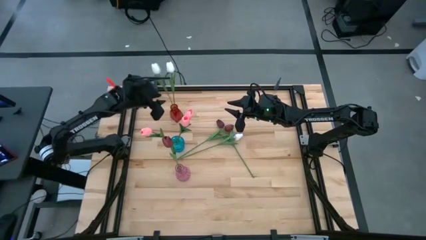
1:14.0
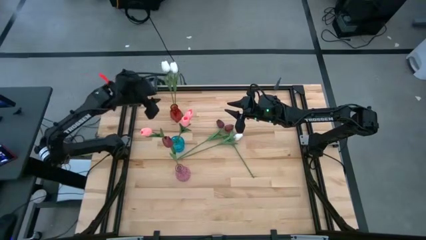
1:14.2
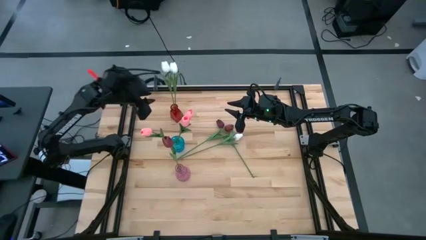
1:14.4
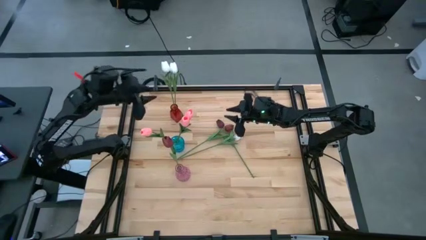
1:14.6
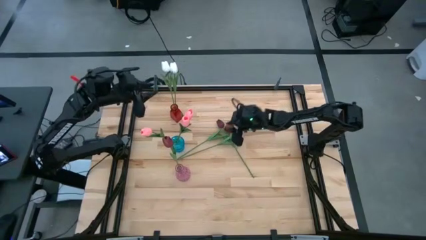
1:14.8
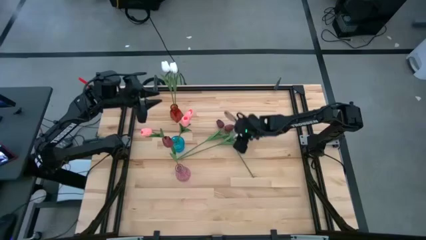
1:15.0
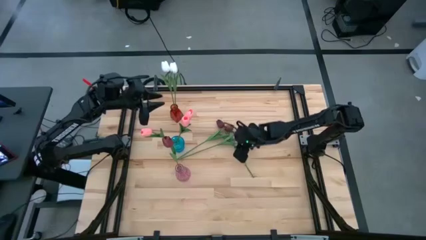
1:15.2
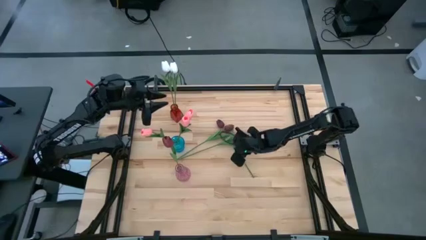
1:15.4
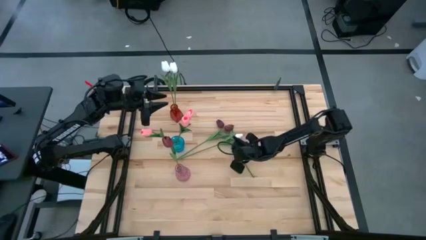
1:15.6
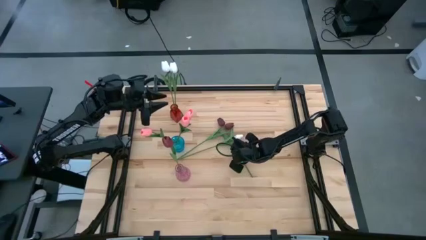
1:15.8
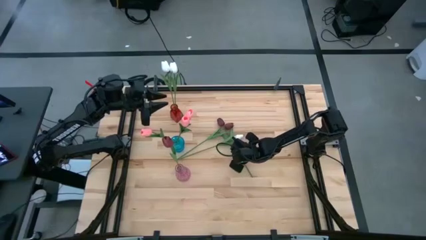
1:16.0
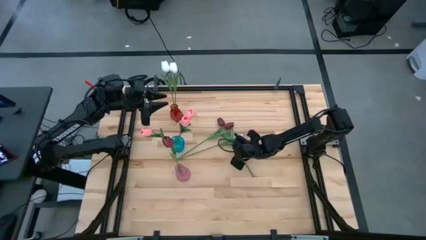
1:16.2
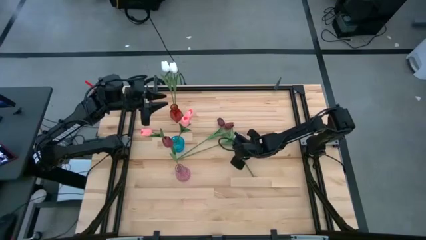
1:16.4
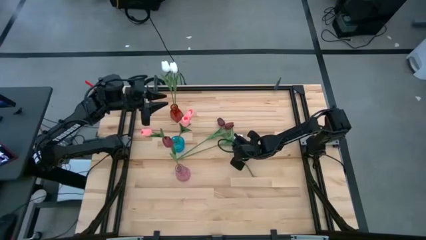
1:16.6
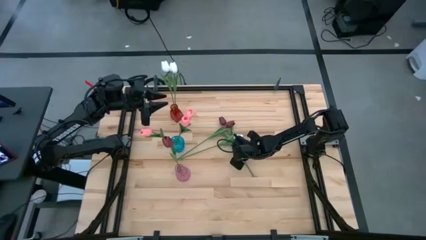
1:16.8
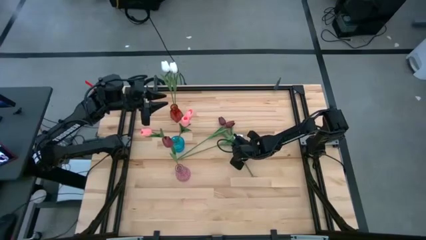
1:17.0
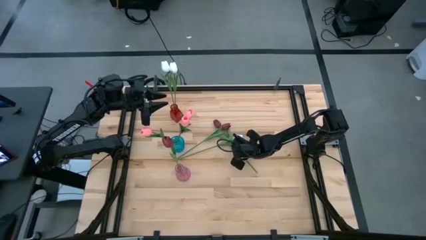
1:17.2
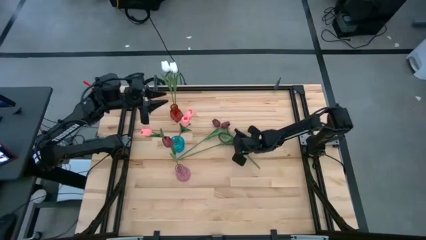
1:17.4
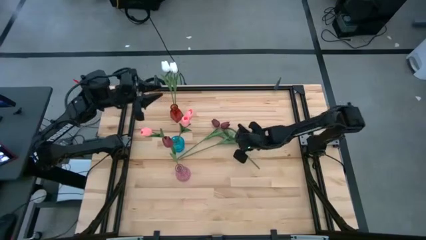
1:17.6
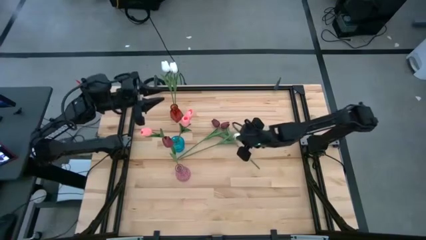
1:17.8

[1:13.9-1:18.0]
Task: Sort flowers into vase by color
Put the right red flower into the pink vase

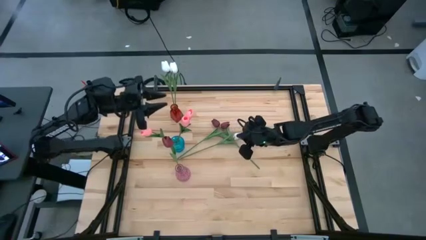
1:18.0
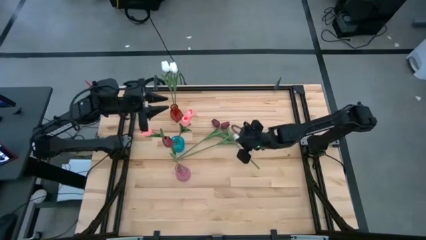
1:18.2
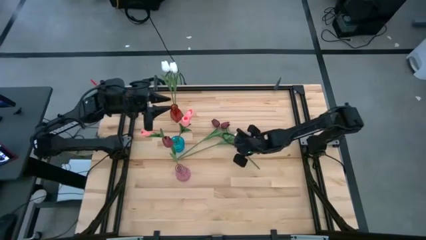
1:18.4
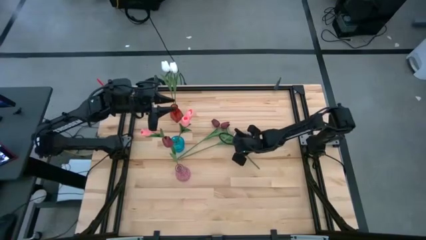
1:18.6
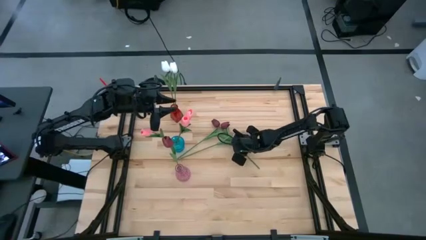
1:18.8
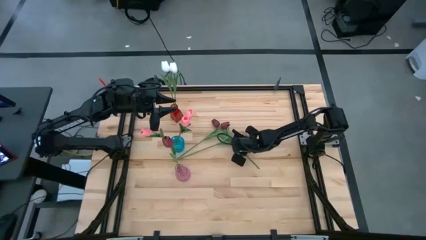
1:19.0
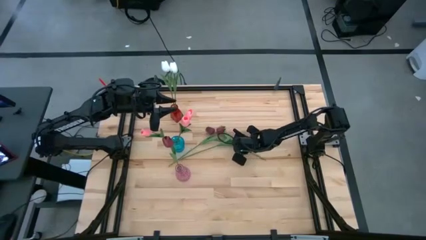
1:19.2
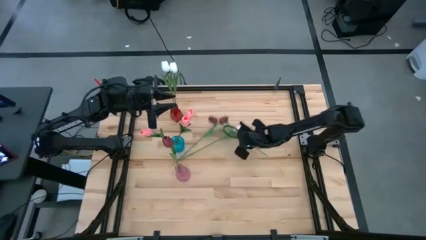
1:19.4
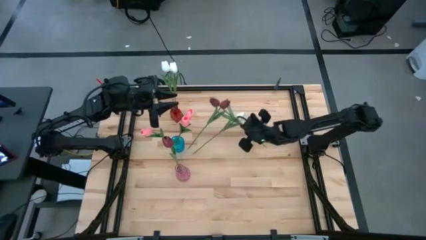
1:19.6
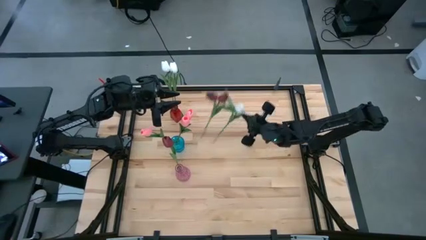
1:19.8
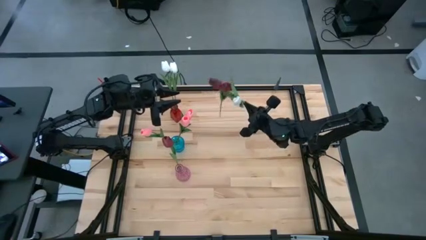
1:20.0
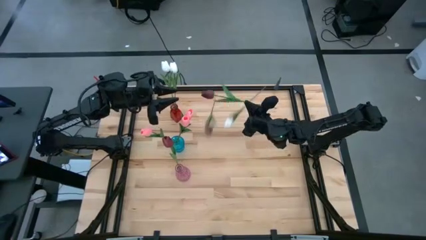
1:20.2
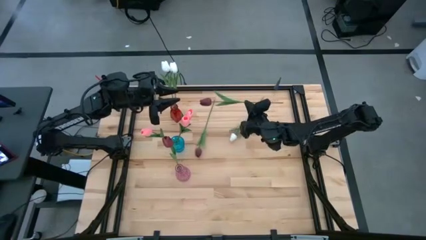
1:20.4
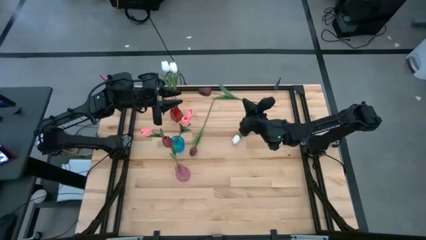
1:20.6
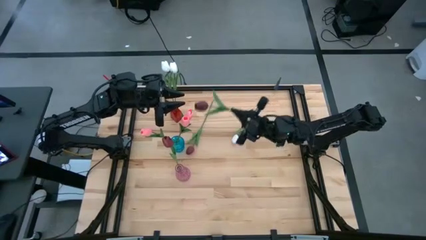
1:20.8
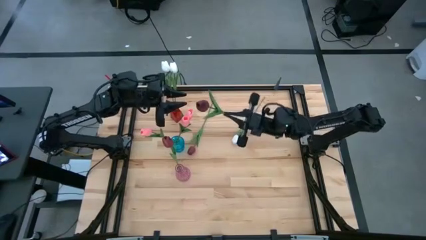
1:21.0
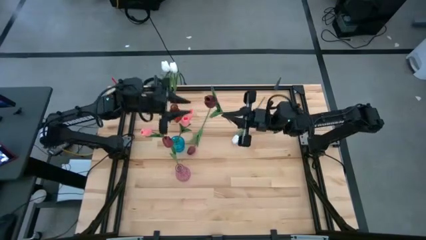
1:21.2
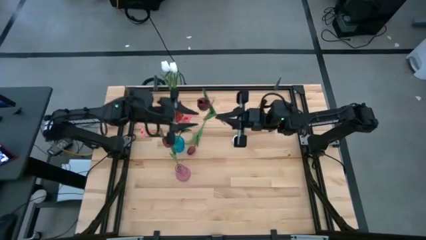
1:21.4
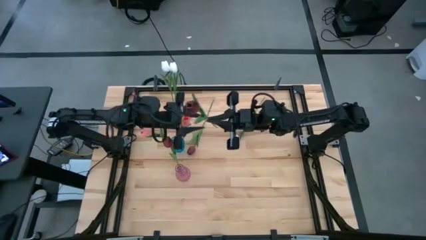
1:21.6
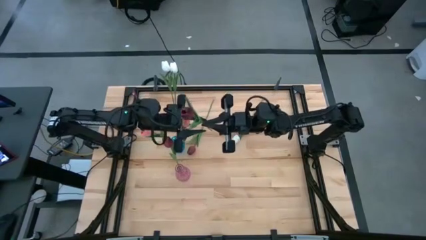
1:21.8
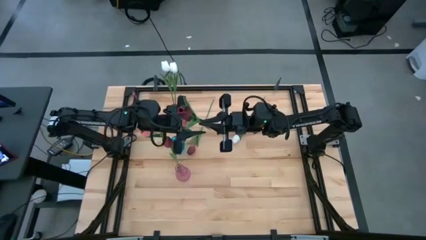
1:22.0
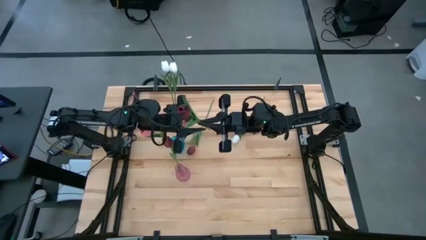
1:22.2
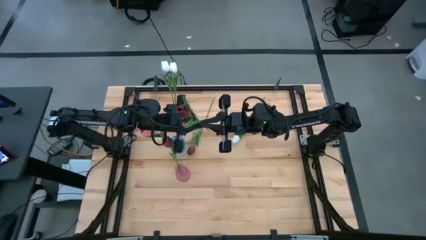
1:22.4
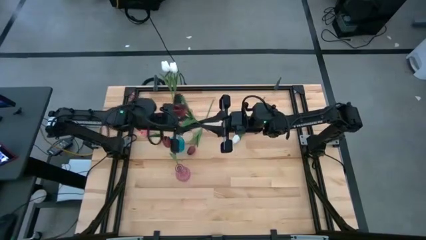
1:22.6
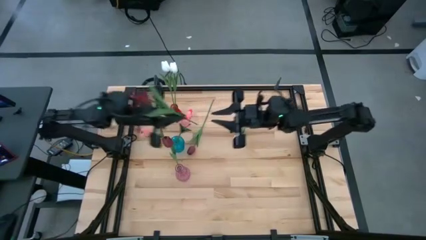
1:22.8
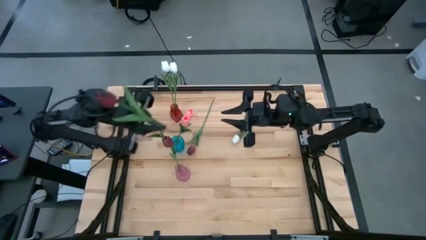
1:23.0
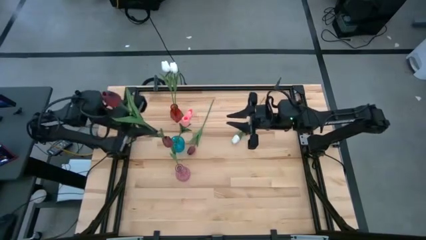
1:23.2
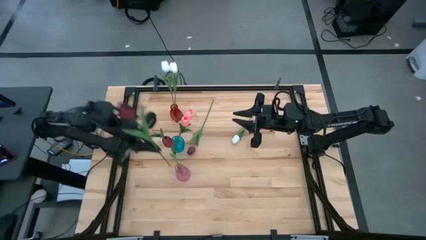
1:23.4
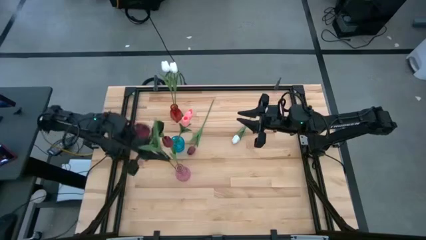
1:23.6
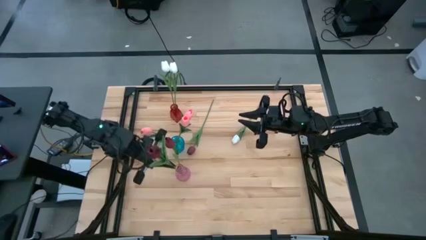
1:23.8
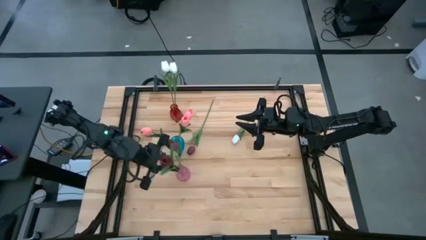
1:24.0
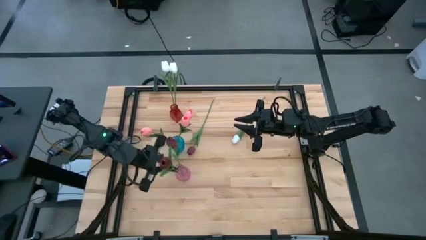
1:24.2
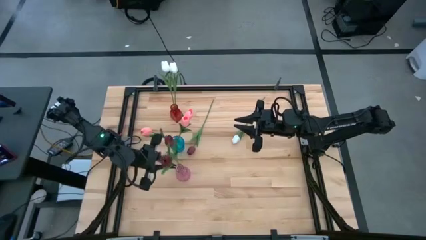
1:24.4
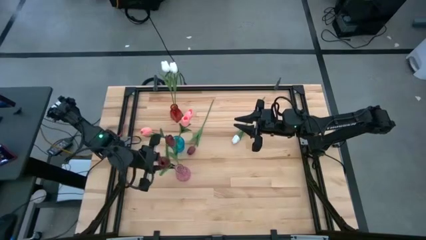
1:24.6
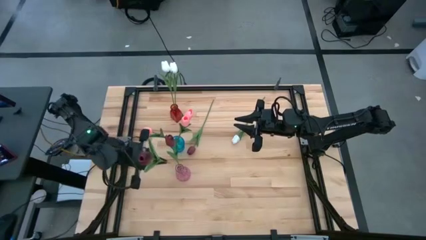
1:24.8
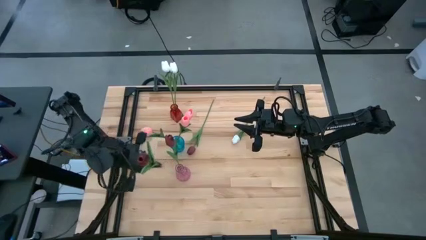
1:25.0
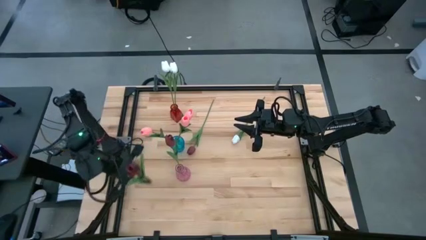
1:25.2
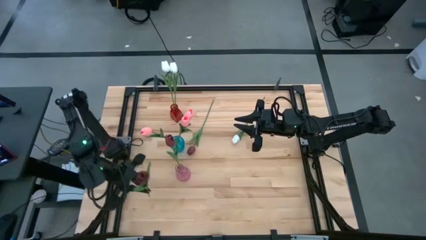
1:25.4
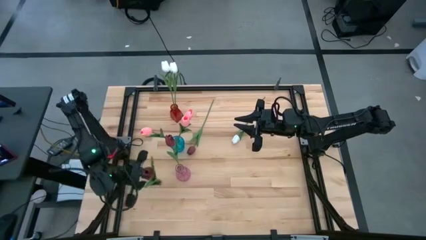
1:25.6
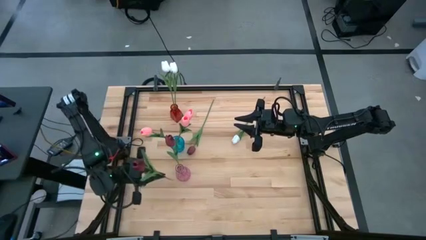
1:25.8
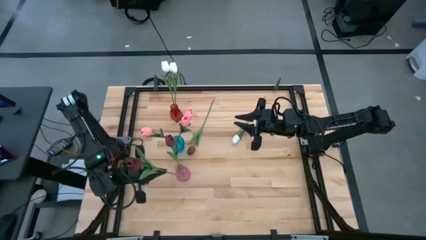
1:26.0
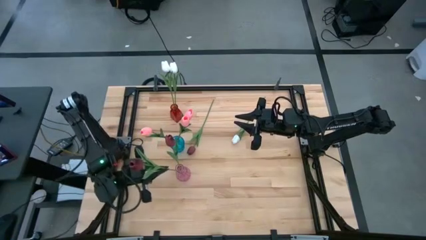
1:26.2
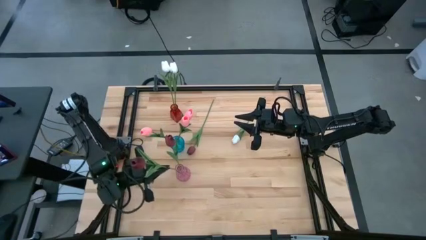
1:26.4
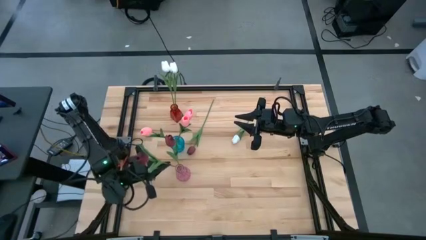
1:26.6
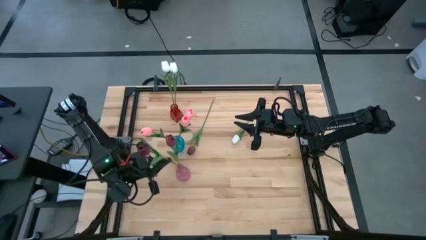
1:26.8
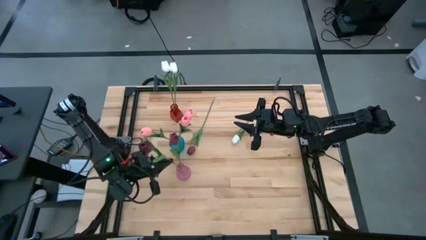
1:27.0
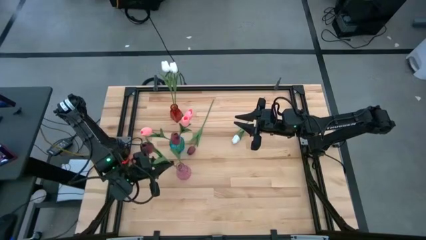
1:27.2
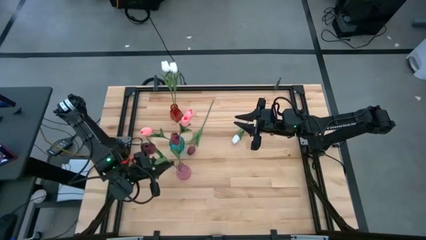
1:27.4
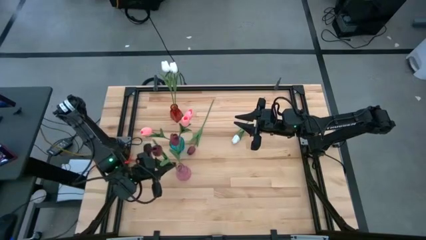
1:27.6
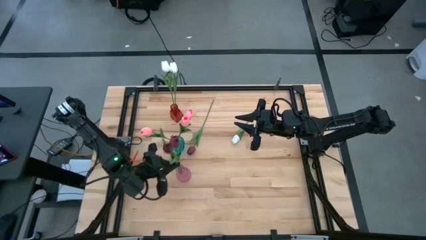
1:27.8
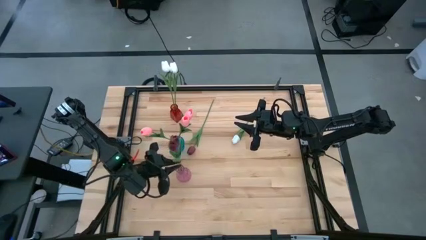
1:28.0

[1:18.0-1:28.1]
Put the right red flower into the pink vase
